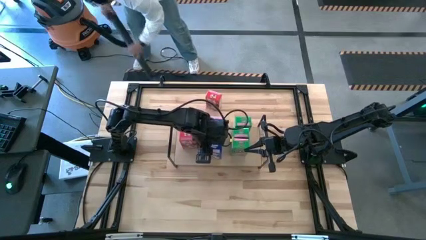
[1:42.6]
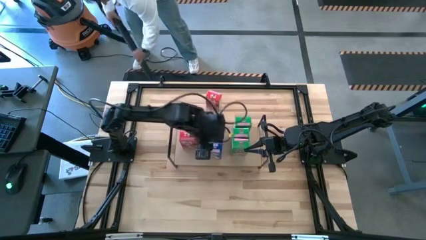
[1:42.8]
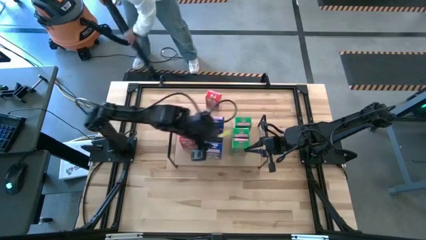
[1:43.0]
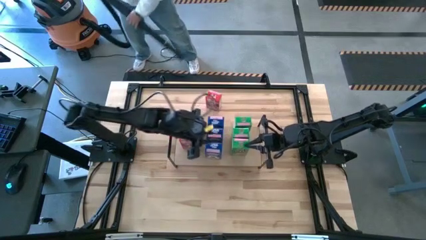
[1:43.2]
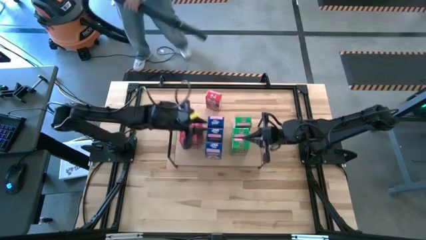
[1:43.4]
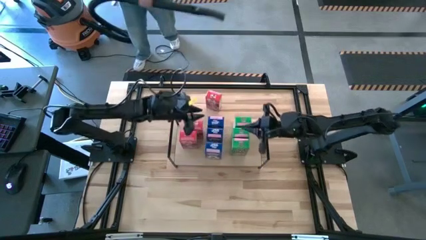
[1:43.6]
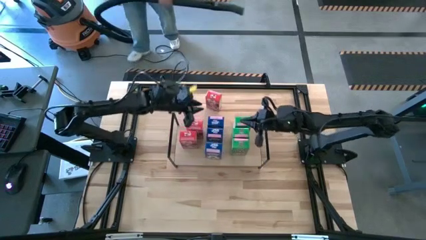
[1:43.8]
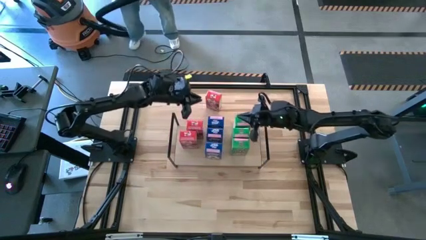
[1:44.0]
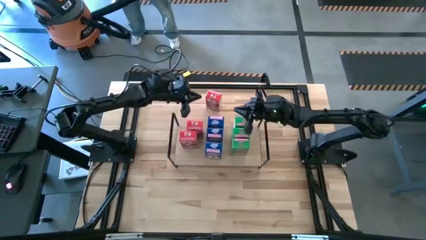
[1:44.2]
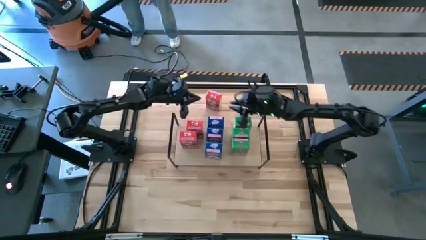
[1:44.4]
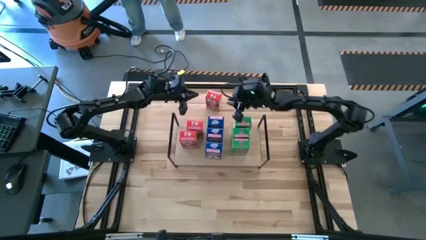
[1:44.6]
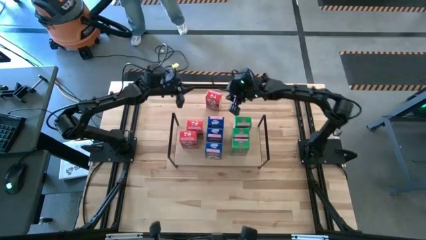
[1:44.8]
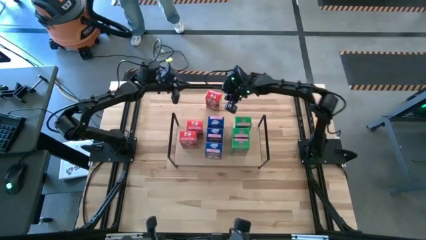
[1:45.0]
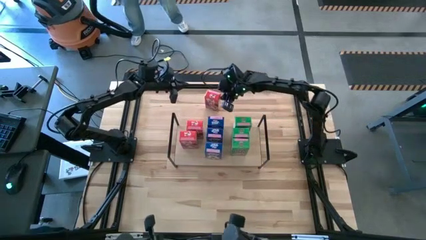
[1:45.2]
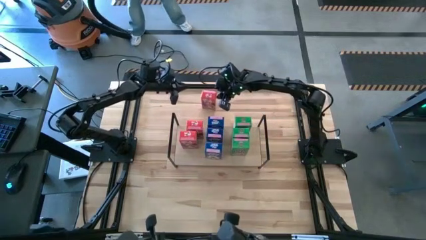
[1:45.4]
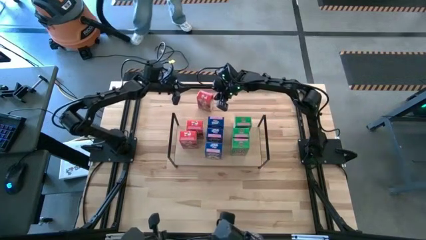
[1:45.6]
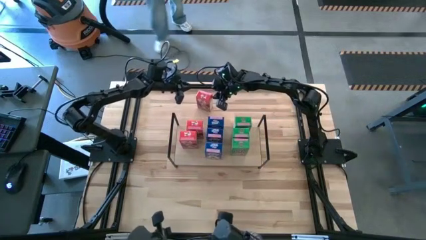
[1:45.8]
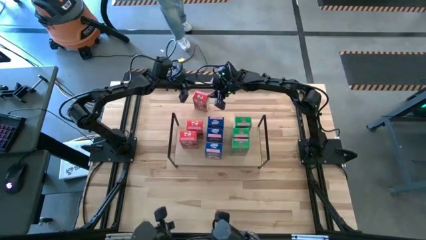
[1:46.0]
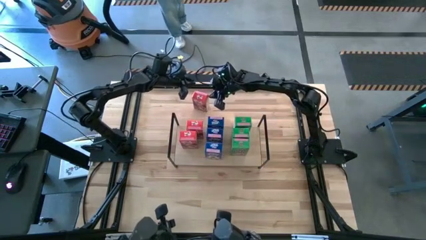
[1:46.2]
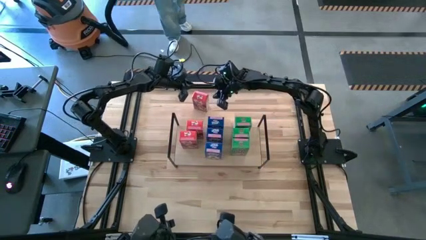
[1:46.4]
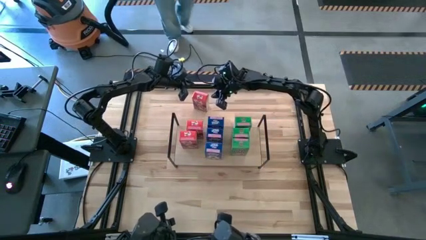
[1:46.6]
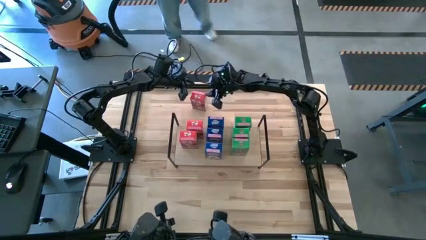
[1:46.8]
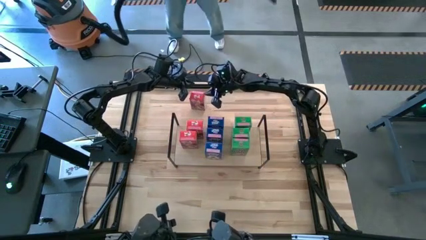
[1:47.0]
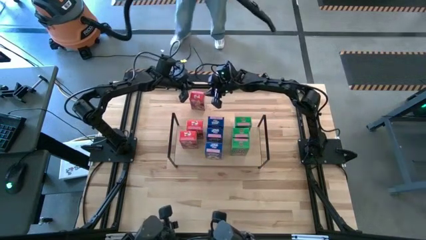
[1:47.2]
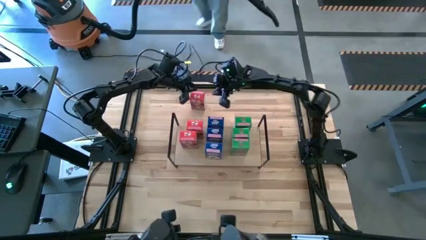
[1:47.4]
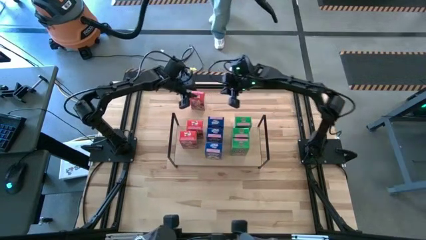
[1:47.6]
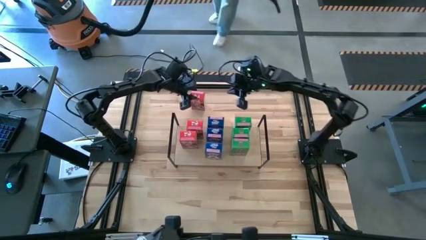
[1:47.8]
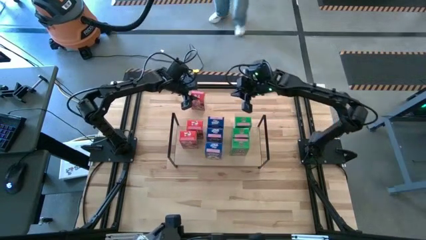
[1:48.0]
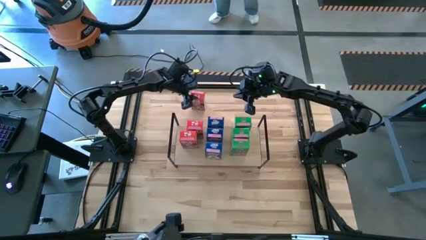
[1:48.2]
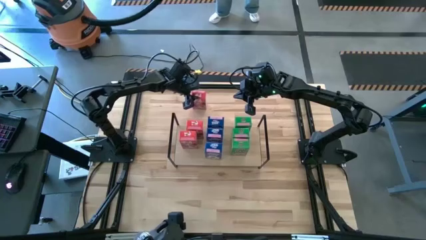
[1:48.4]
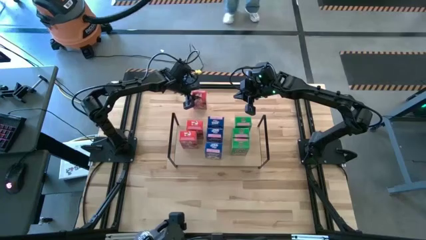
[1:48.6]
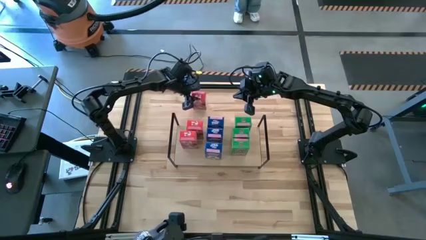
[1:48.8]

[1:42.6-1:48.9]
Task: Stack cereal on shelf
Put the red cereal box on the shelf aligned with the other red cereal boxes

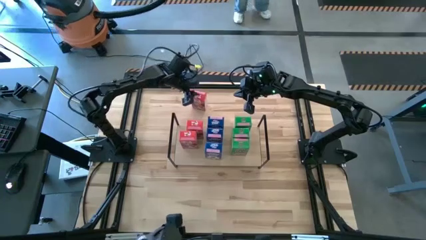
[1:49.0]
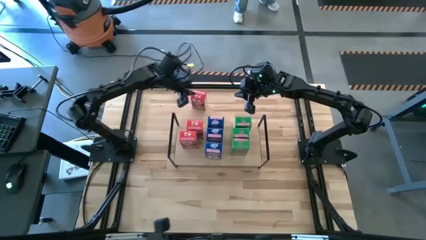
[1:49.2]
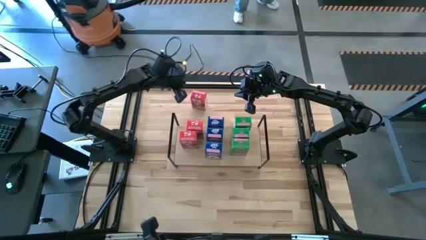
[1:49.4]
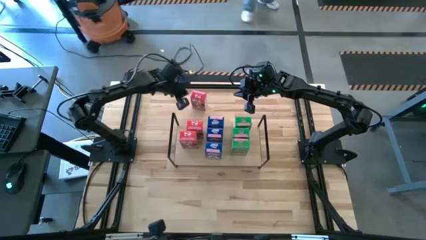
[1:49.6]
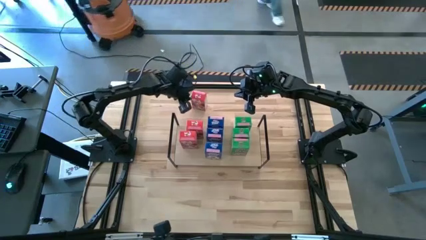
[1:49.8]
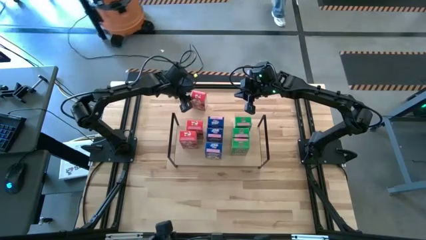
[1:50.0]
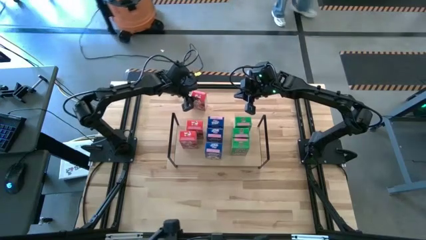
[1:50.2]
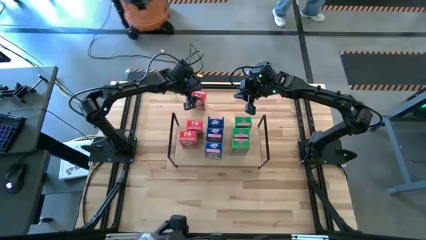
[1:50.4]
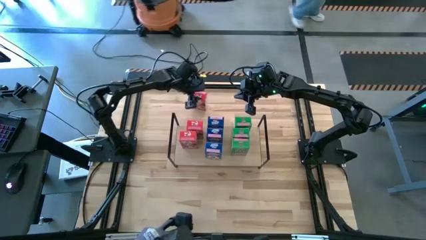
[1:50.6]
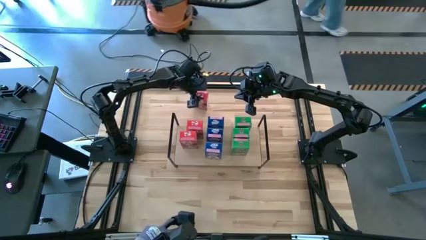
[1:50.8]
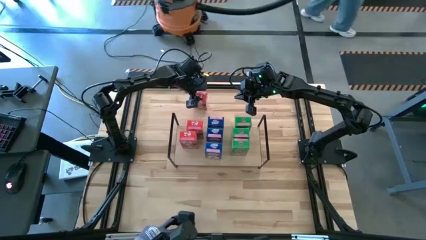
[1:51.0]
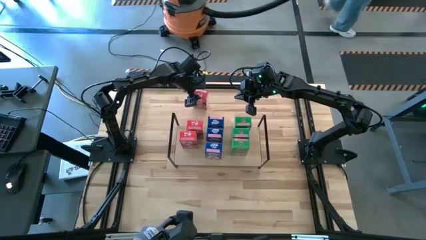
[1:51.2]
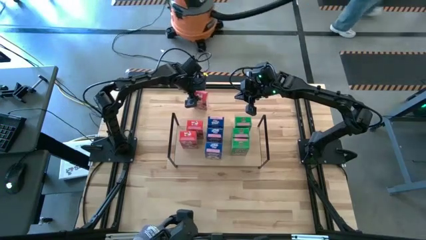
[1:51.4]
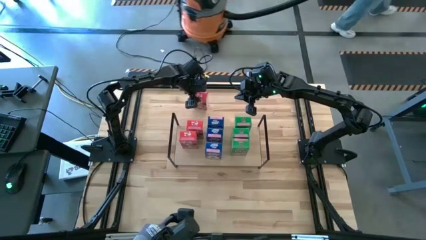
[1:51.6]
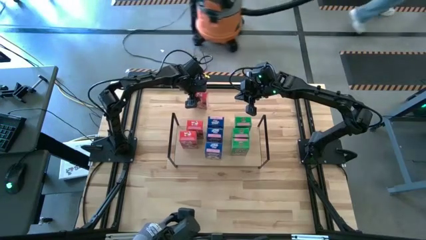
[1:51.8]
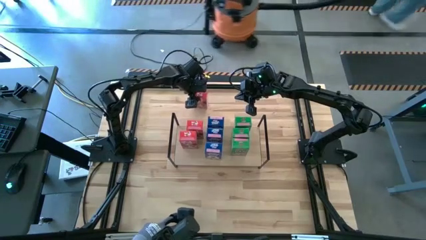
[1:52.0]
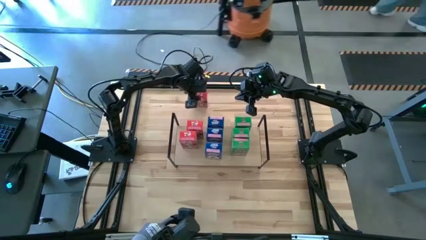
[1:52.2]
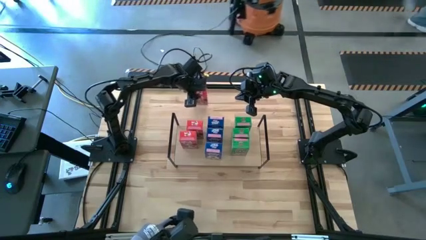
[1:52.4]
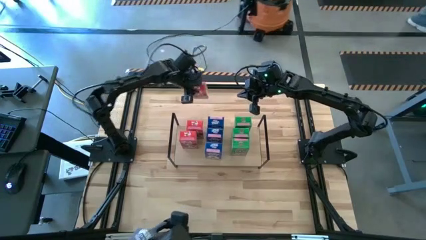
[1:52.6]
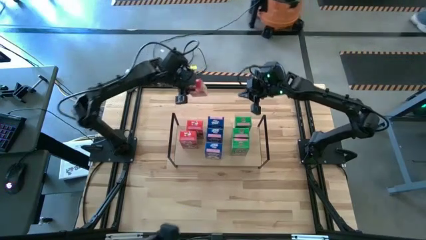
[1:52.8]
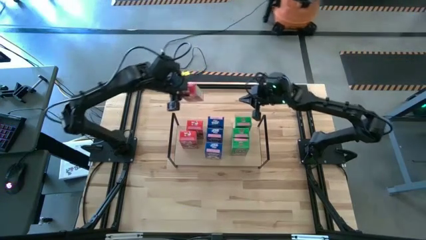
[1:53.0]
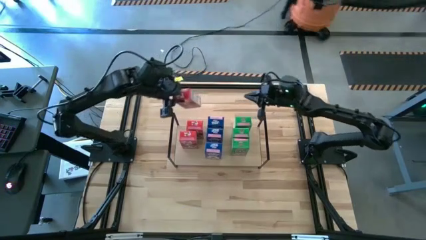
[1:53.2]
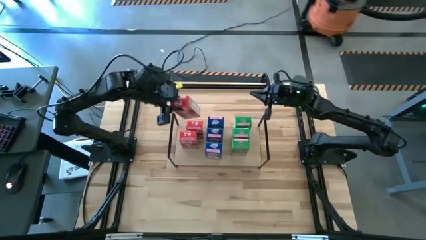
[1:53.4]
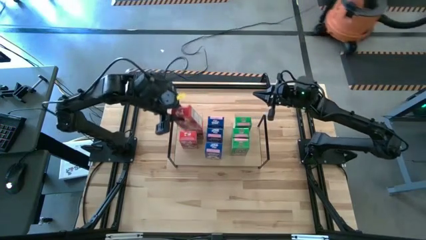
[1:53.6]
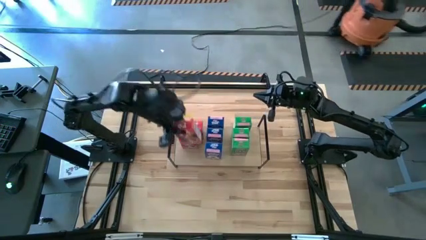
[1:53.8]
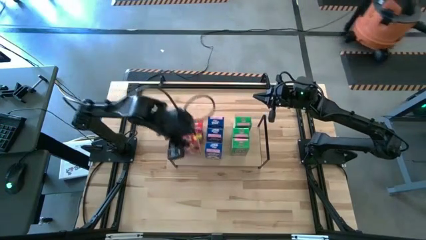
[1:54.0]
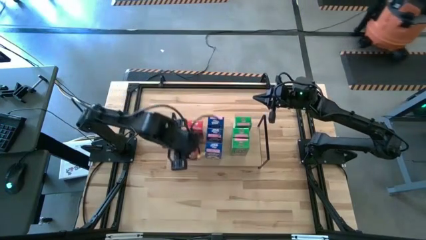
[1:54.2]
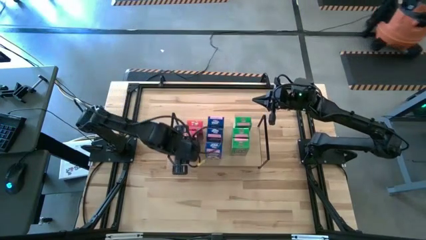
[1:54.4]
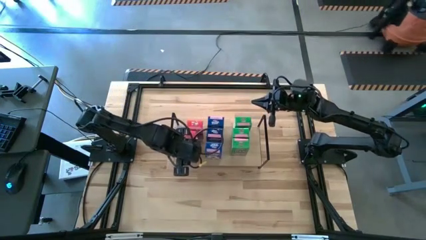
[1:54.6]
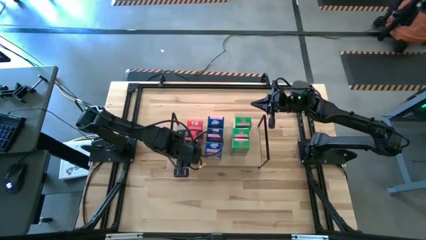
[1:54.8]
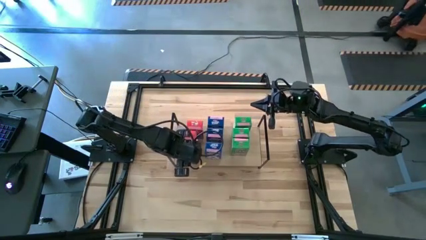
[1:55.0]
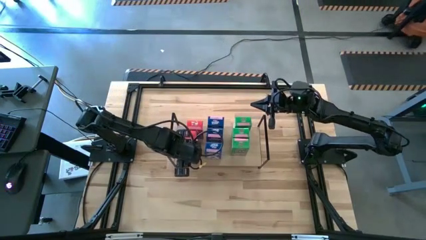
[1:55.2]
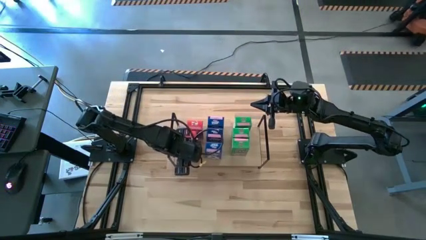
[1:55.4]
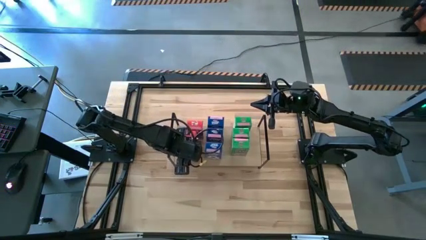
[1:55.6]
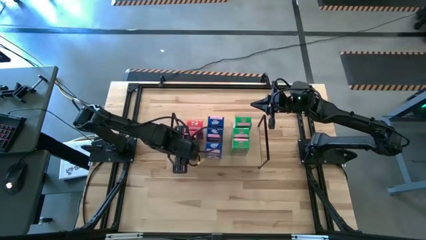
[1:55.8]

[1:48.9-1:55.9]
Put the red cereal box on the shelf aligned with the other red cereal boxes

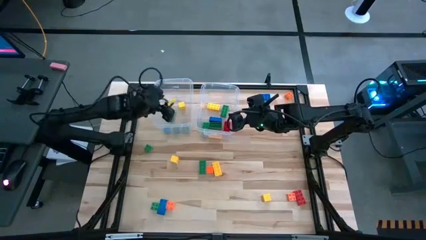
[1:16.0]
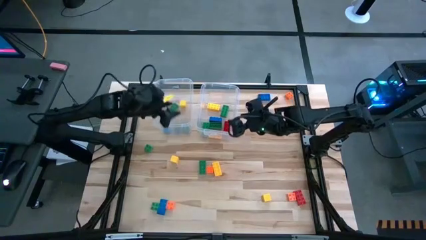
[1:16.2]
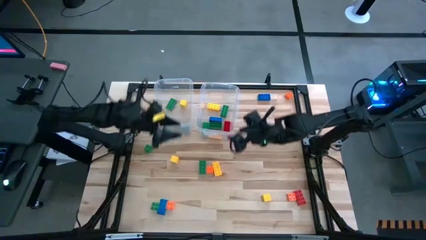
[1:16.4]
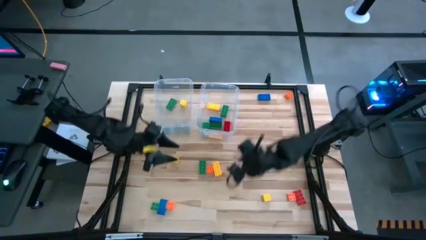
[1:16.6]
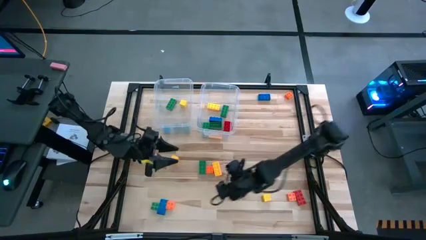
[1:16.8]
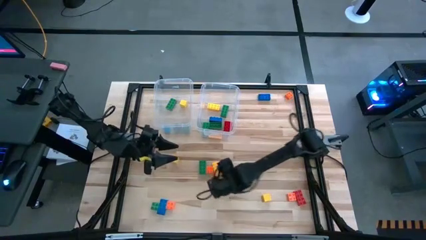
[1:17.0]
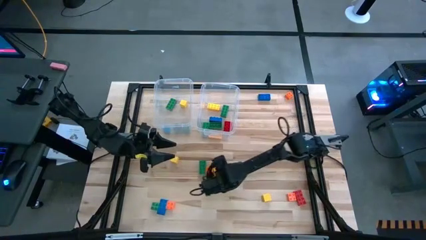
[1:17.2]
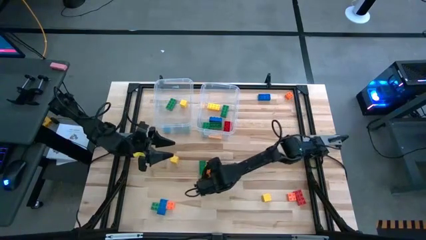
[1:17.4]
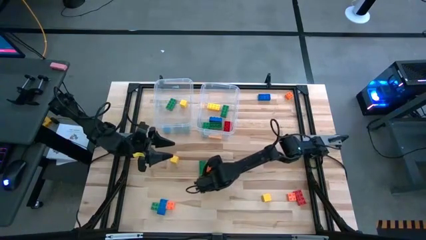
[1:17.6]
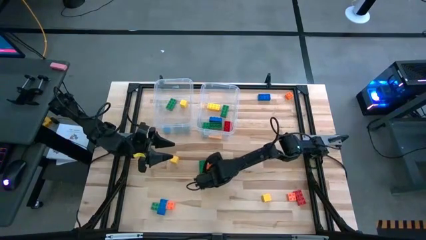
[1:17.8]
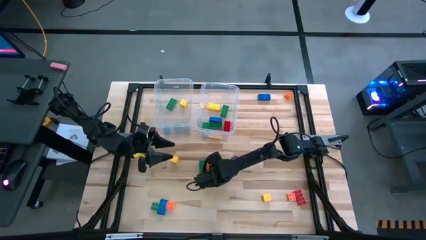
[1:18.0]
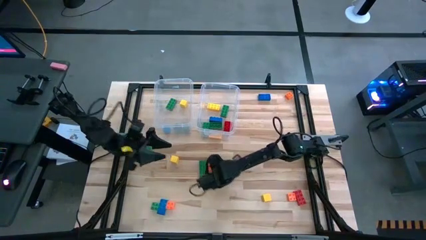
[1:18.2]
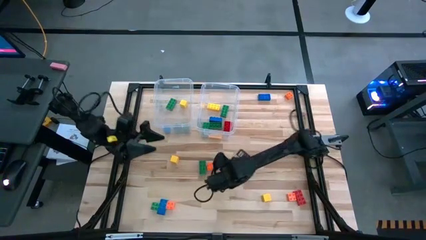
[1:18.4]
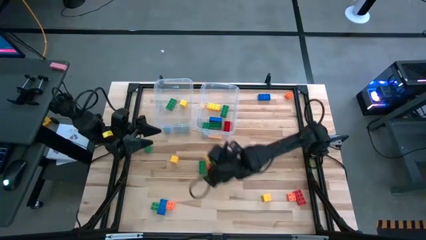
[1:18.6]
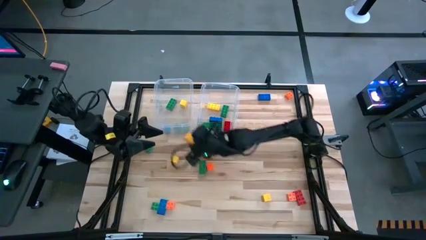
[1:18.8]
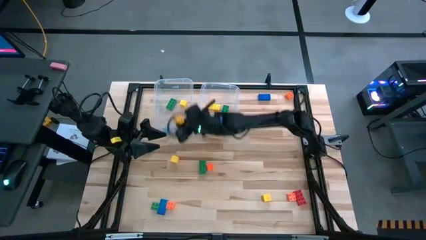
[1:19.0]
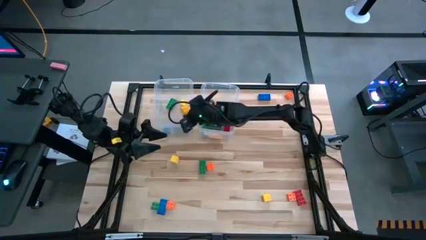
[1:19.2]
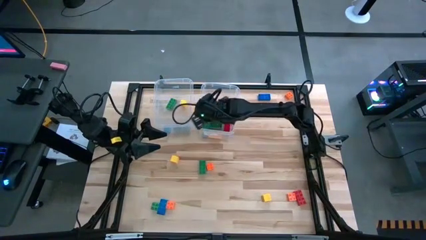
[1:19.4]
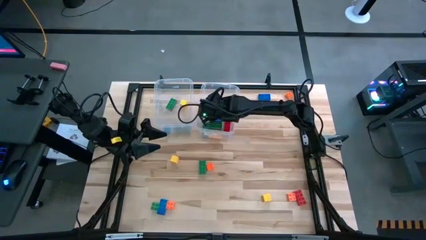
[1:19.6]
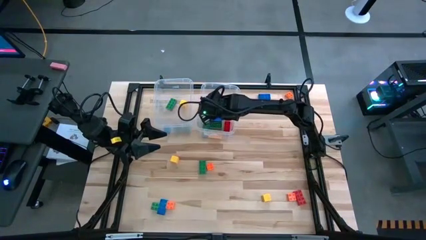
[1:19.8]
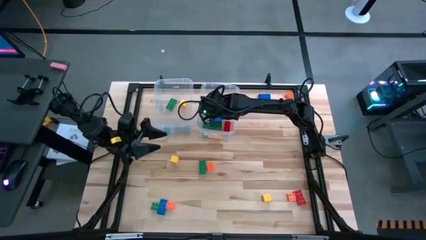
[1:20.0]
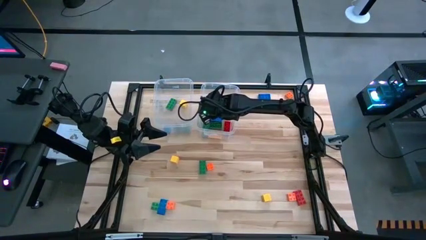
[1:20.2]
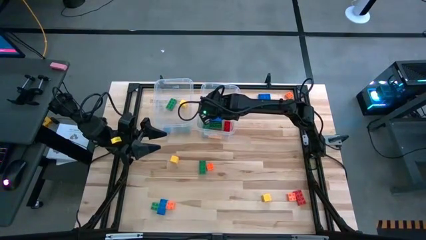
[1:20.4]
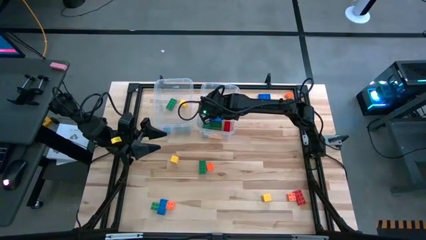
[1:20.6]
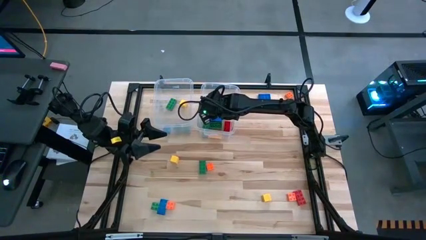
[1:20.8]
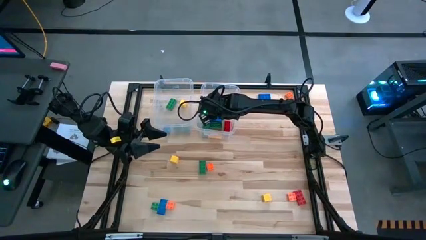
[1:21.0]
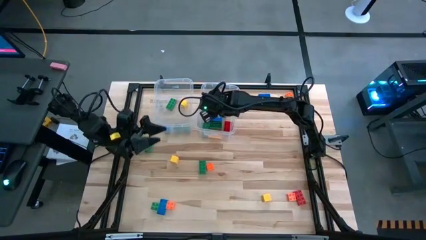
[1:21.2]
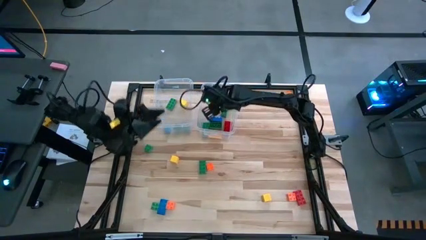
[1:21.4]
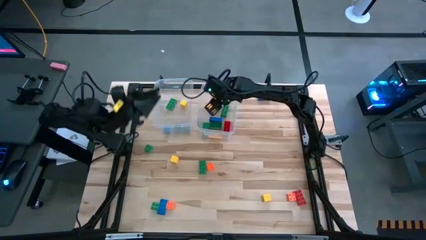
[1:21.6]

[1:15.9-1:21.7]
Task: Sort blocks by size
Put the yellow big game piece into the right transparent bin
